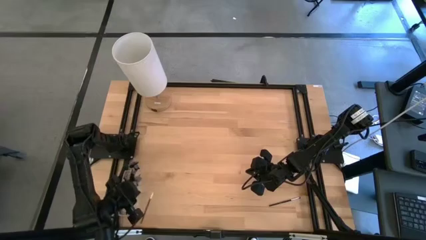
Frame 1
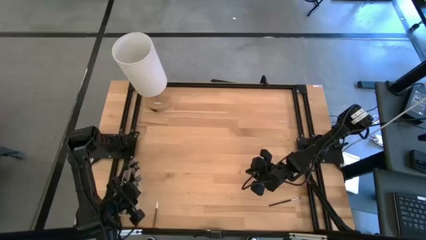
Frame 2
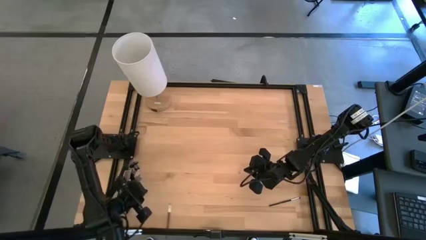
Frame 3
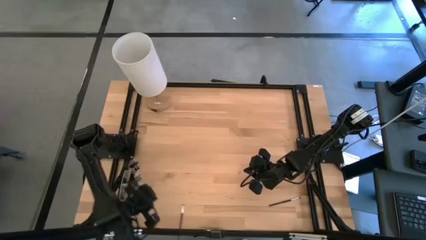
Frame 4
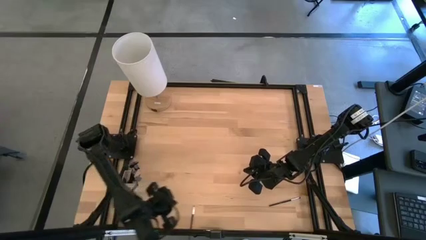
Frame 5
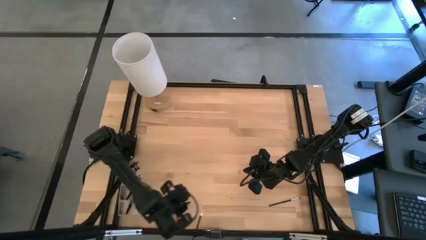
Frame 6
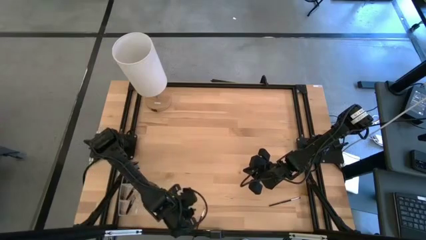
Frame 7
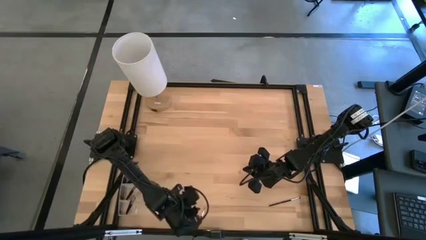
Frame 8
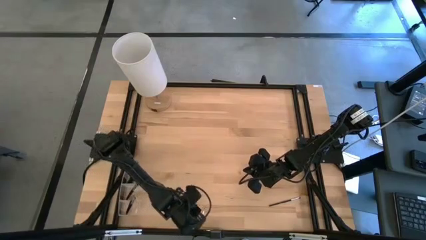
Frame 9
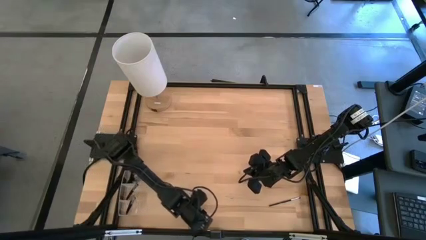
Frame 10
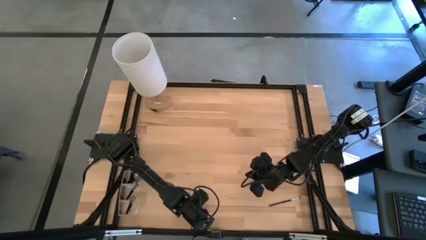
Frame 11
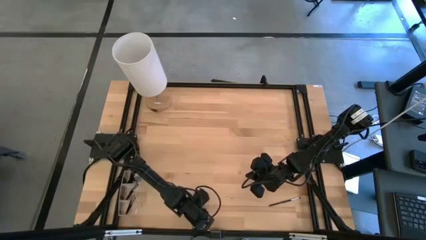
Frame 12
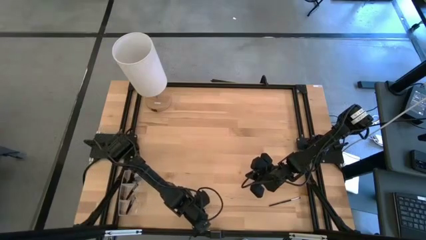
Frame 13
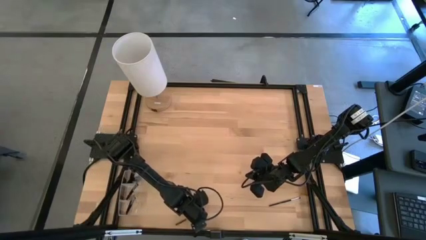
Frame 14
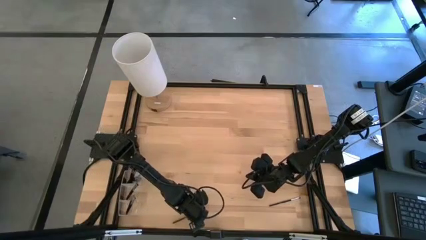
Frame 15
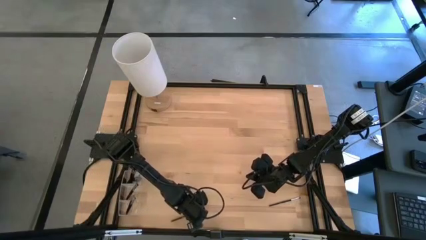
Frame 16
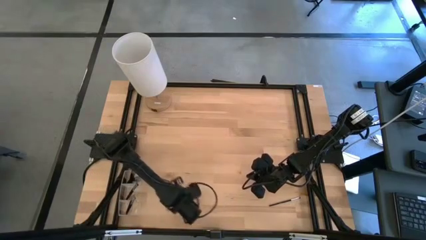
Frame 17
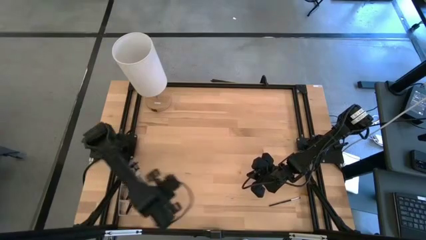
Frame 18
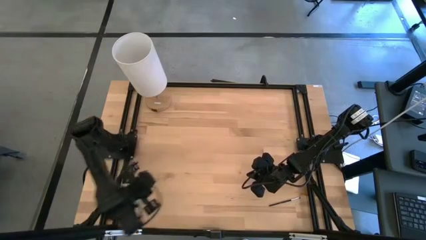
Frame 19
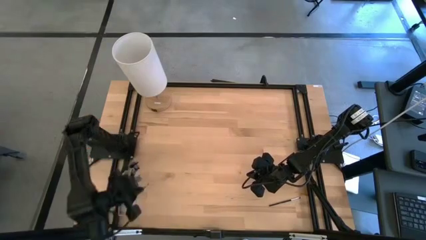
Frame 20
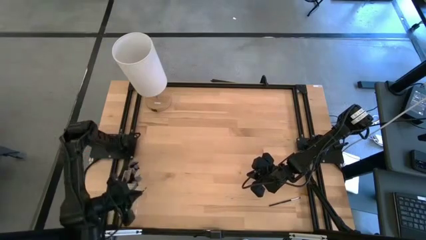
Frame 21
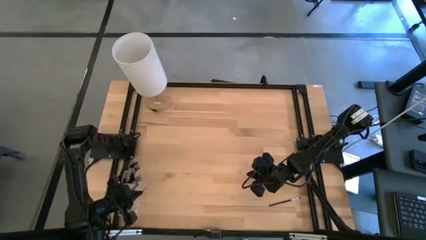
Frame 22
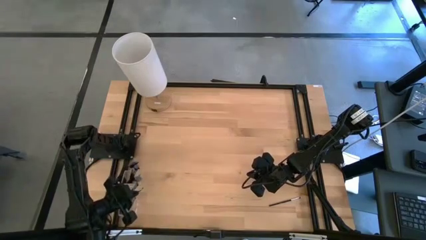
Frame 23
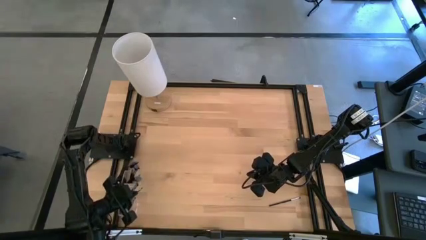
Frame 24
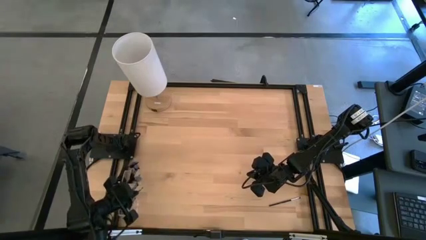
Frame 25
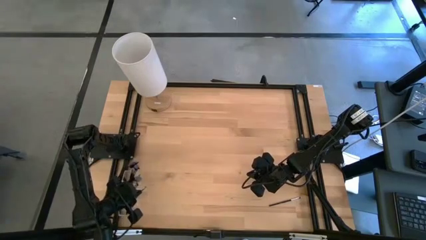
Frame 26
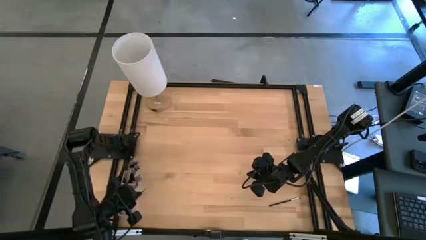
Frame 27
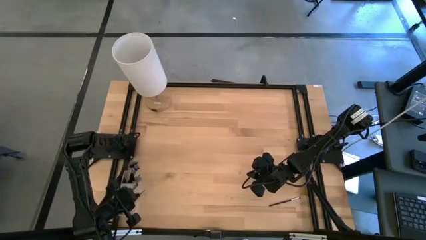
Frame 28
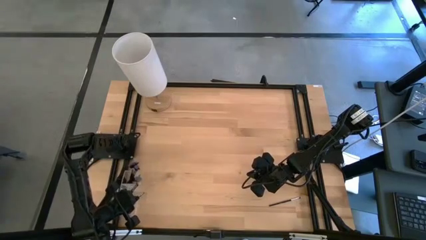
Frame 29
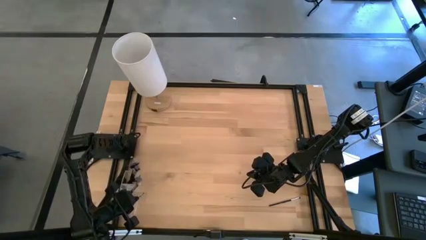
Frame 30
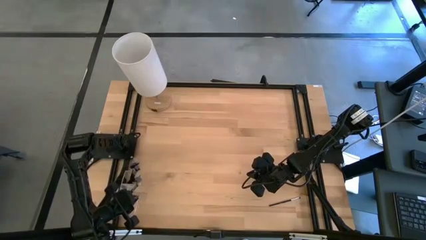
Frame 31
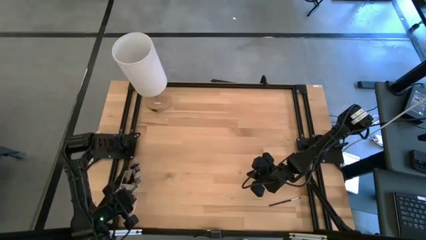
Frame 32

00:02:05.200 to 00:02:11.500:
Task: Pick & Place Makeup Supplies
Put the left makeup brush into the transparent organizer

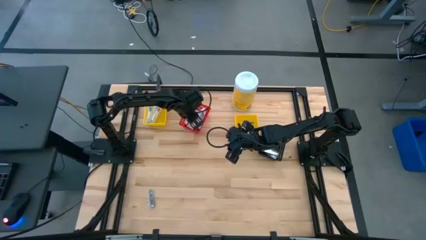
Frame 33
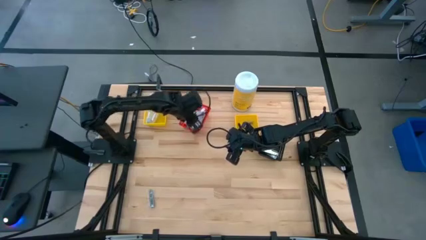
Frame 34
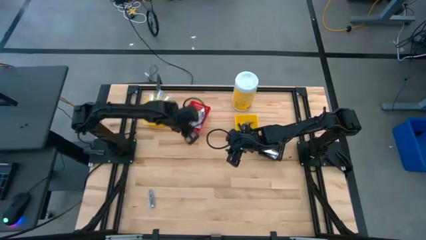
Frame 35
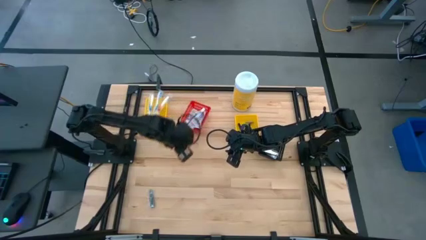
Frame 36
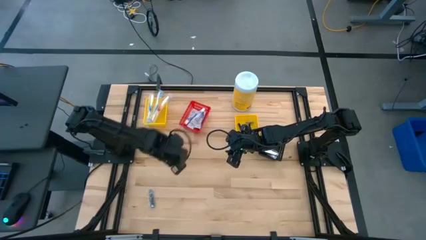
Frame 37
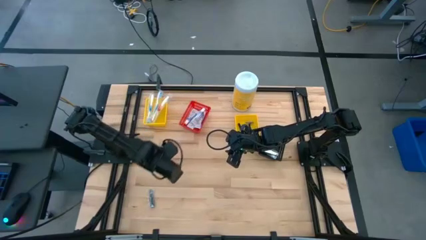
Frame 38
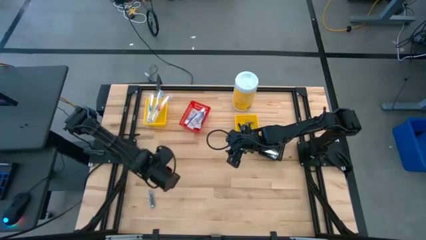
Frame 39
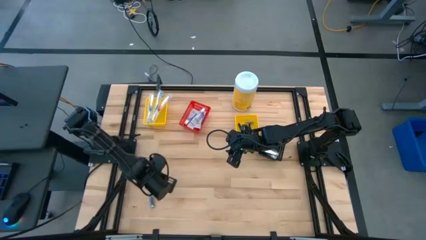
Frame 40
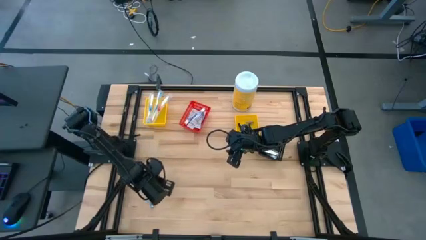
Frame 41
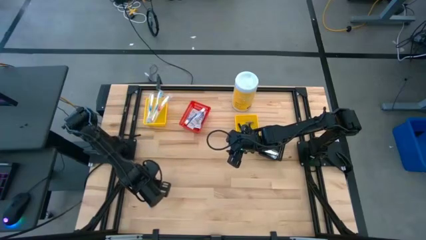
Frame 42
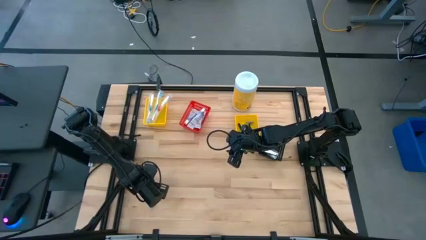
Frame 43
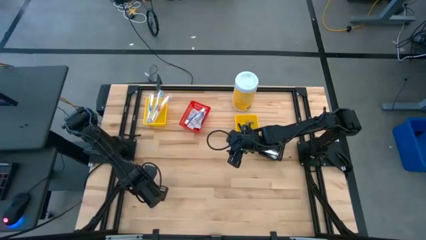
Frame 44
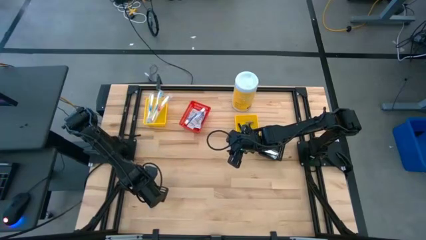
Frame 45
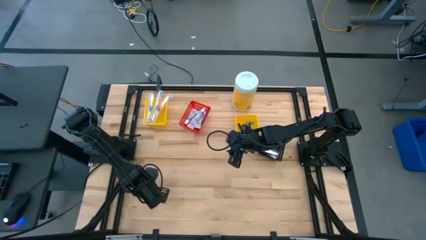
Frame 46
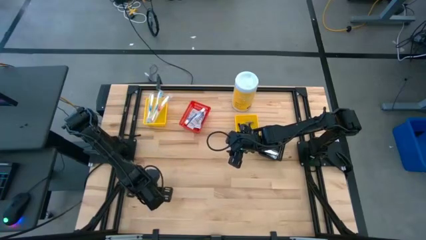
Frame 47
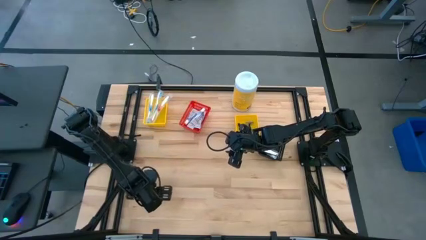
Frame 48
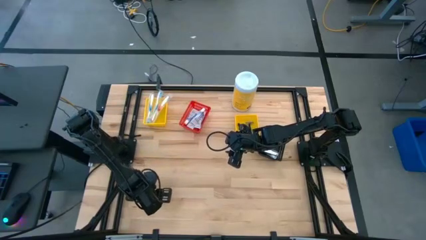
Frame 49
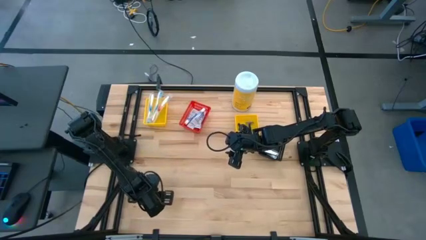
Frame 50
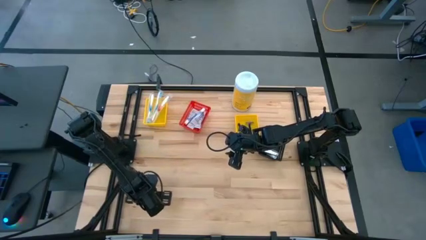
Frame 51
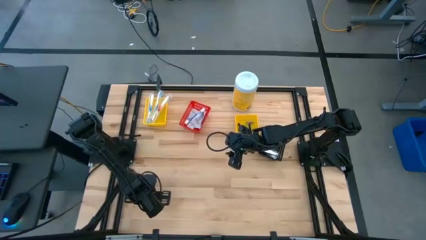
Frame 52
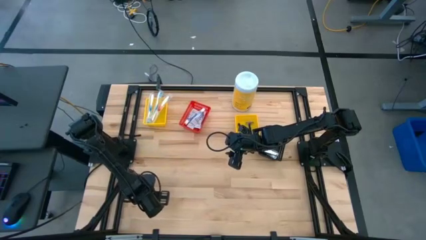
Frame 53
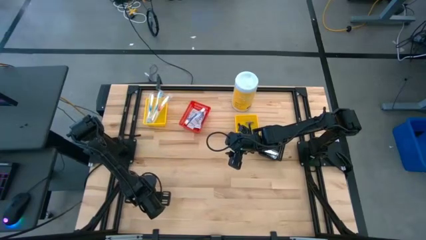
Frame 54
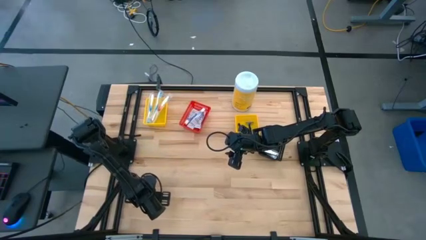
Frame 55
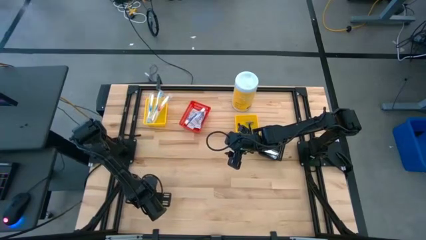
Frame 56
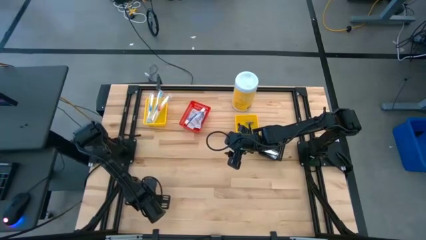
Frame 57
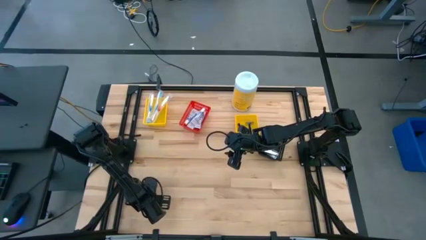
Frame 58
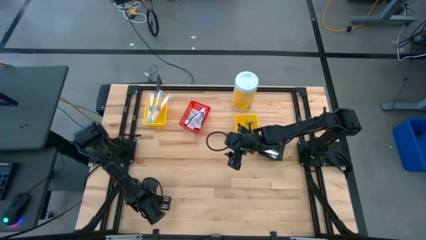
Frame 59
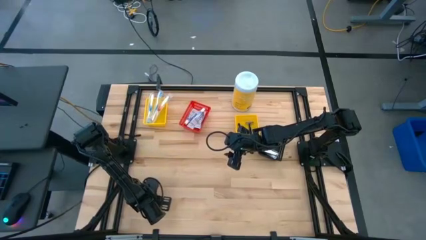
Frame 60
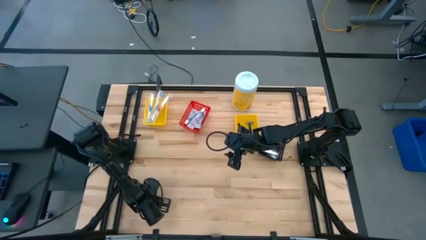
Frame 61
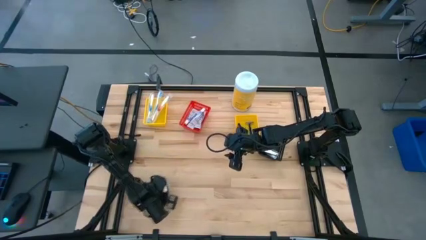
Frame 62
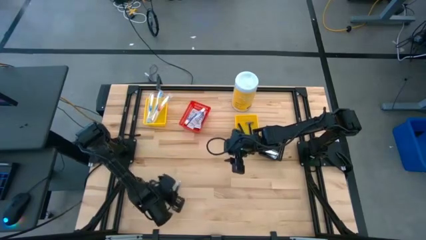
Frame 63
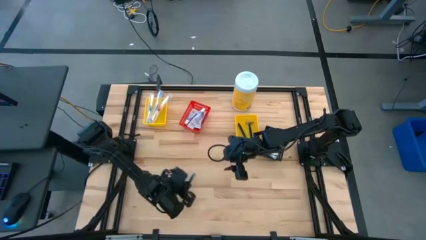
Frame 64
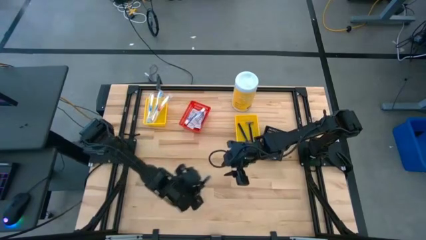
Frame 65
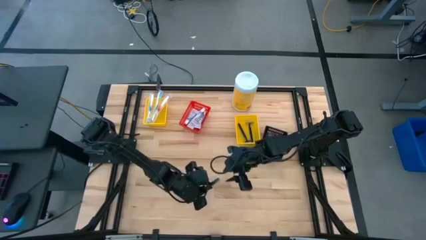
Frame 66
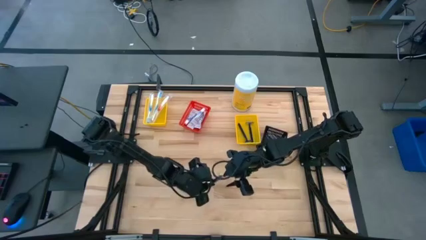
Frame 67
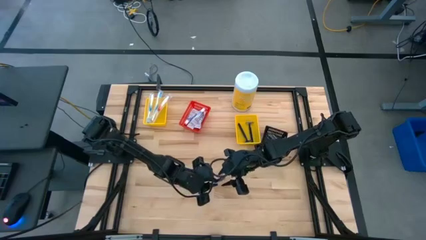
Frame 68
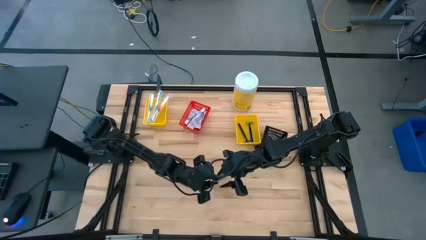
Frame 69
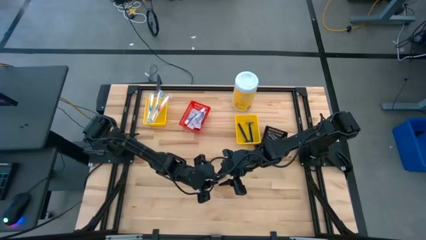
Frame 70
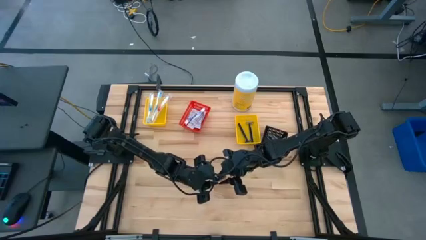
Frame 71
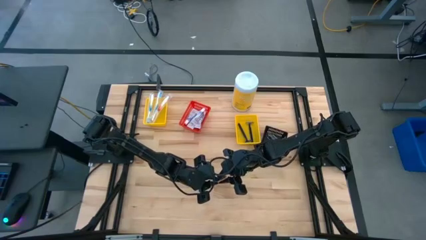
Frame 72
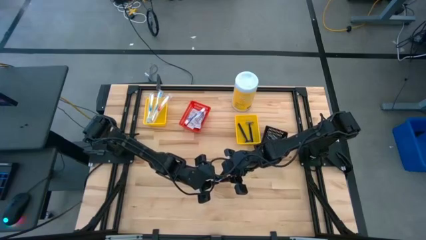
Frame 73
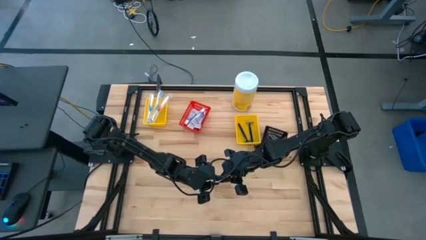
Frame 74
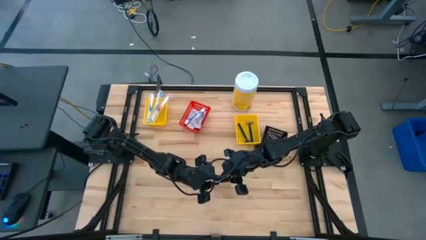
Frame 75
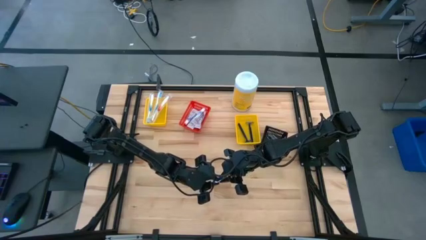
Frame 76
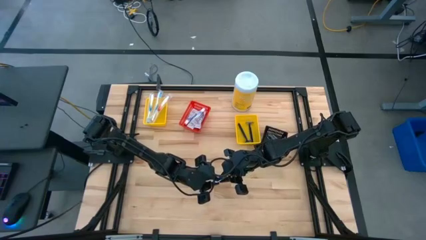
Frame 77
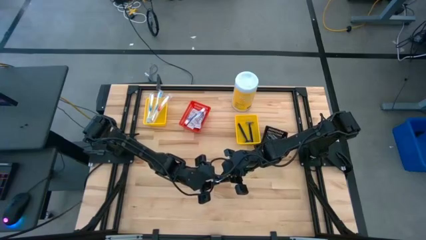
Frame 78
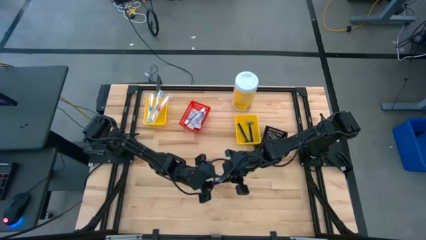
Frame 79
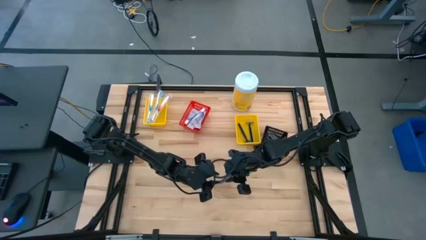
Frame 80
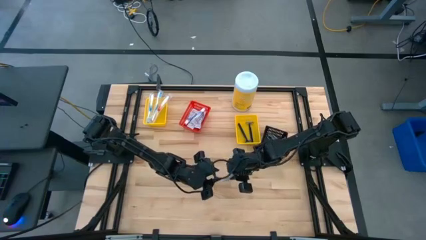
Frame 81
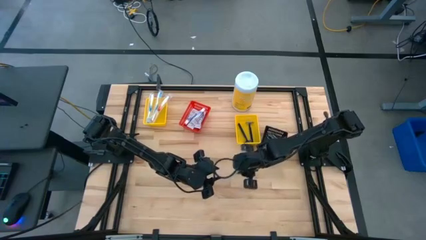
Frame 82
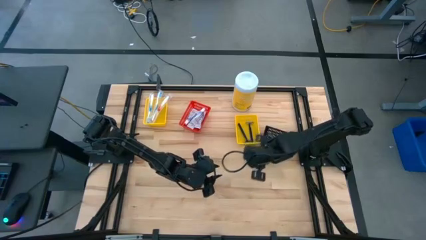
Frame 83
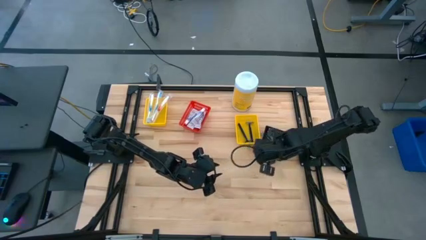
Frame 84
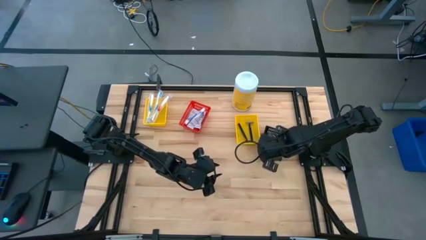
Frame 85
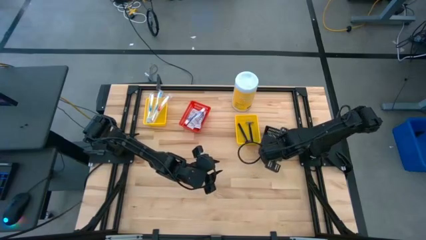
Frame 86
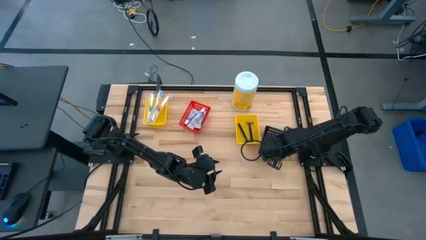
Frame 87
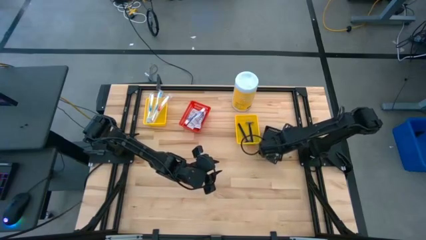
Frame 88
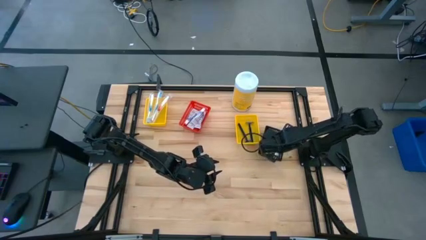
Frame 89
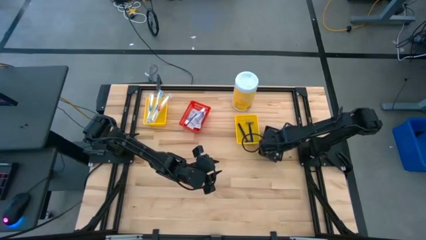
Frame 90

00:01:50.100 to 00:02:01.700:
Task: Pick & Place Travel size toiletries
Put the silver nail cutter into the black basket
